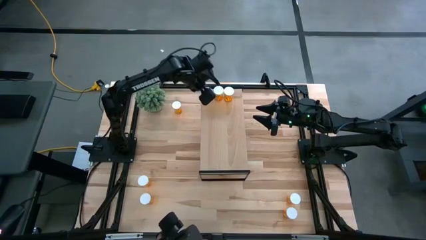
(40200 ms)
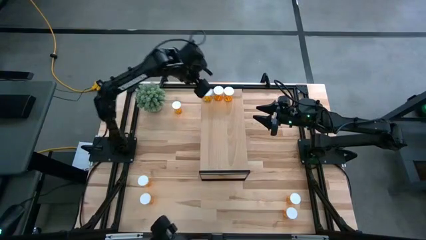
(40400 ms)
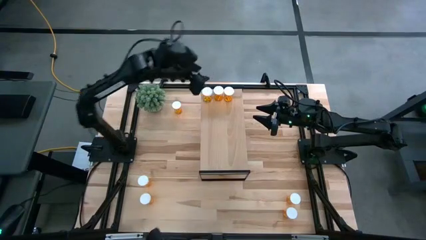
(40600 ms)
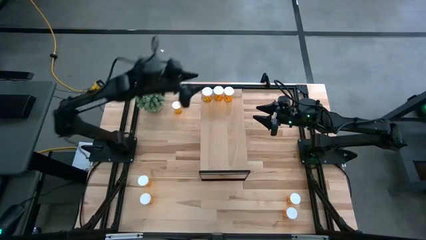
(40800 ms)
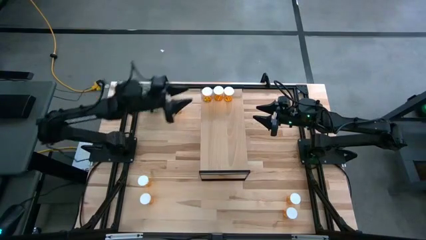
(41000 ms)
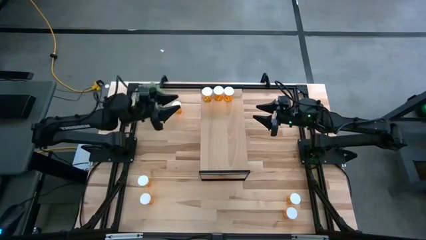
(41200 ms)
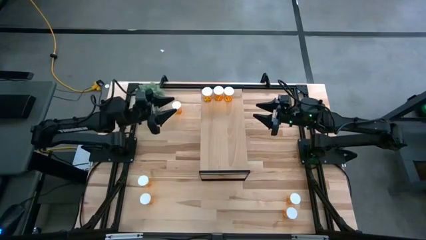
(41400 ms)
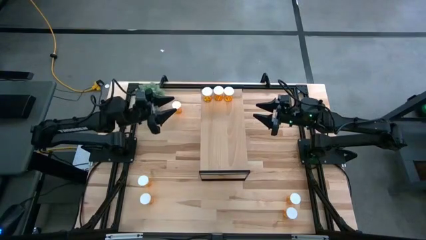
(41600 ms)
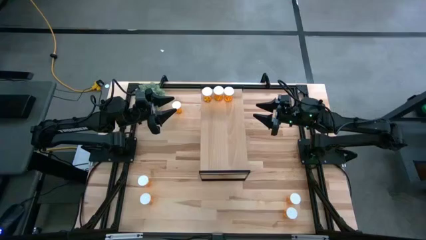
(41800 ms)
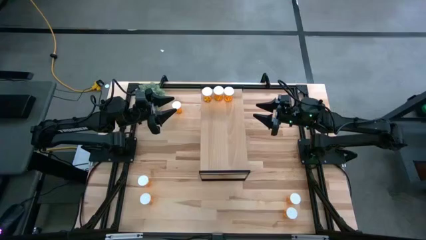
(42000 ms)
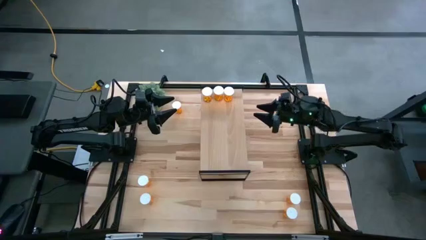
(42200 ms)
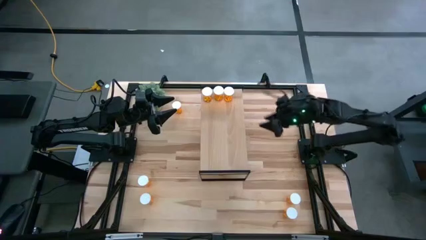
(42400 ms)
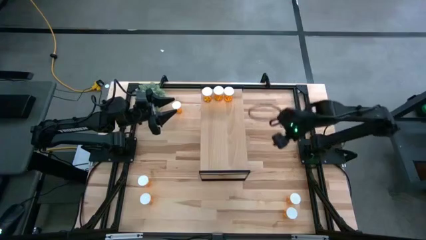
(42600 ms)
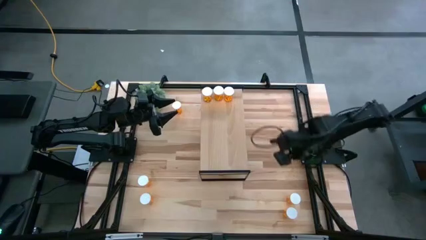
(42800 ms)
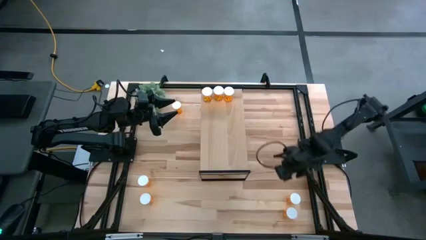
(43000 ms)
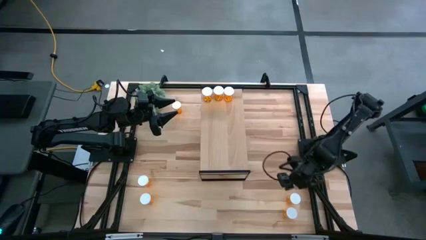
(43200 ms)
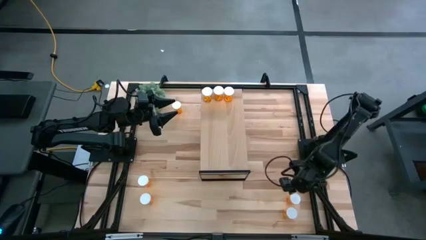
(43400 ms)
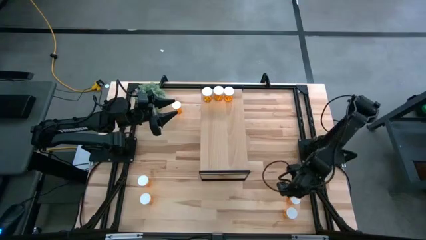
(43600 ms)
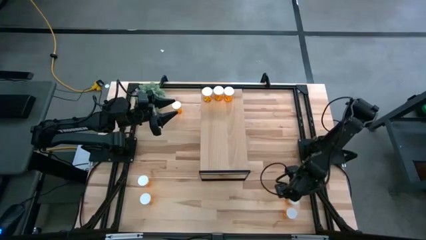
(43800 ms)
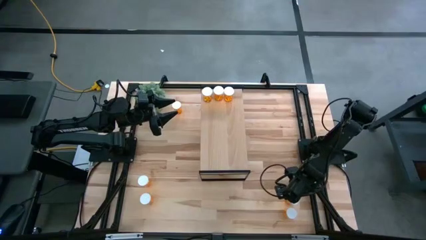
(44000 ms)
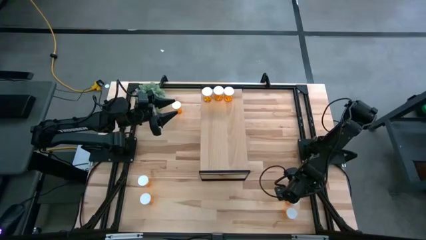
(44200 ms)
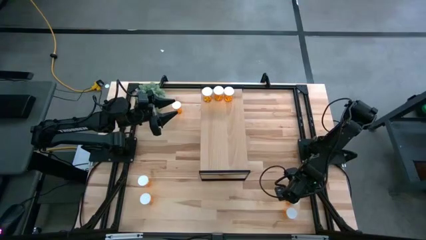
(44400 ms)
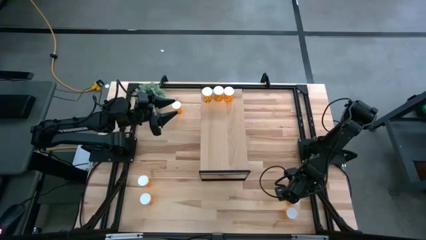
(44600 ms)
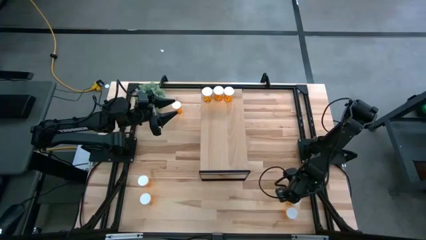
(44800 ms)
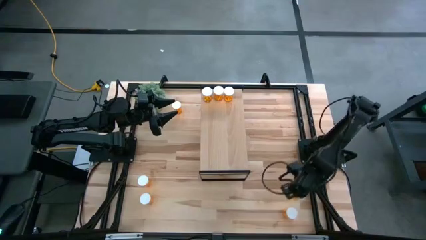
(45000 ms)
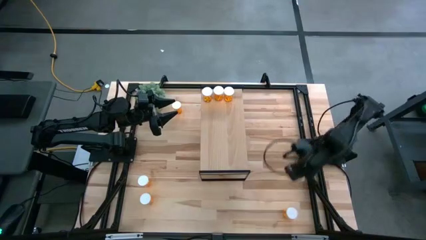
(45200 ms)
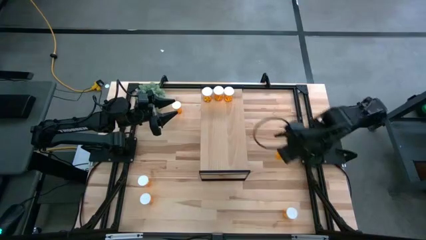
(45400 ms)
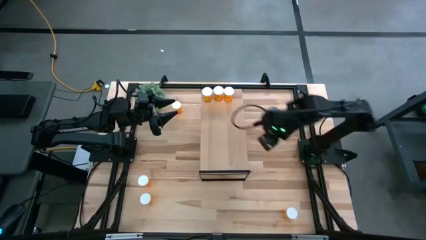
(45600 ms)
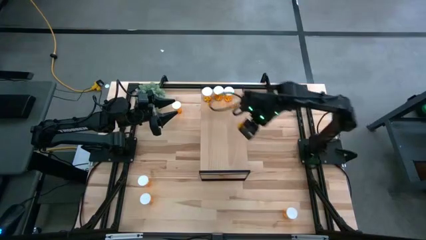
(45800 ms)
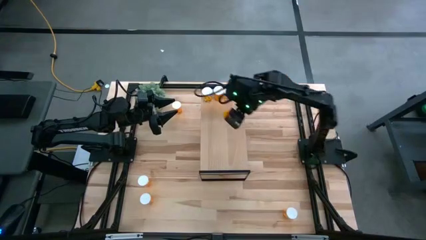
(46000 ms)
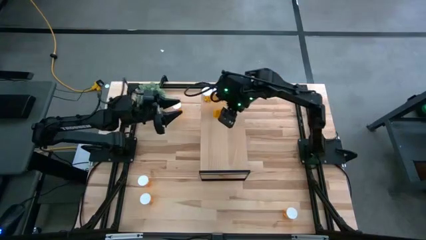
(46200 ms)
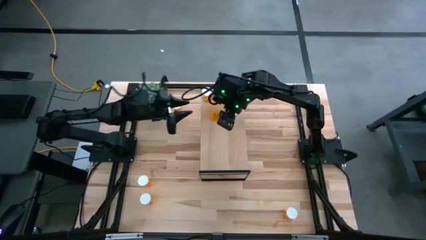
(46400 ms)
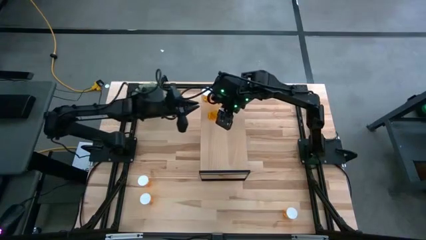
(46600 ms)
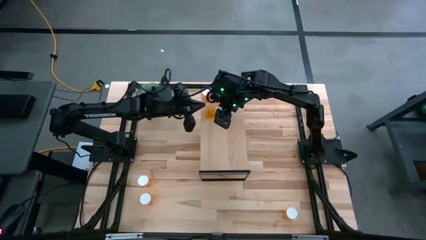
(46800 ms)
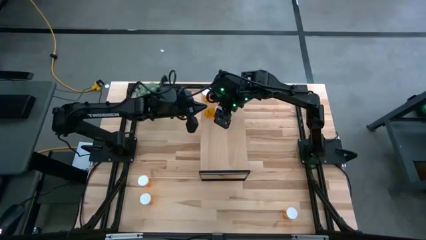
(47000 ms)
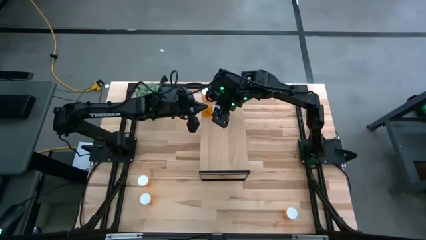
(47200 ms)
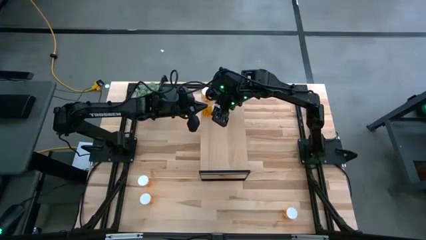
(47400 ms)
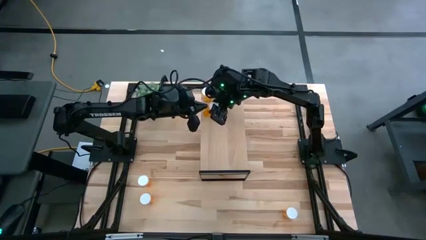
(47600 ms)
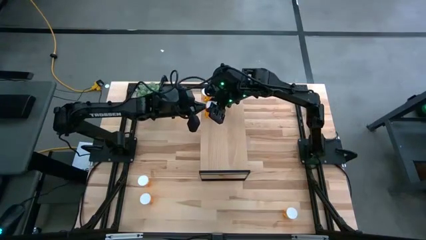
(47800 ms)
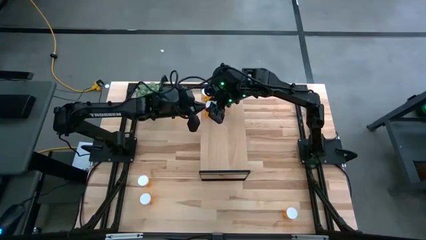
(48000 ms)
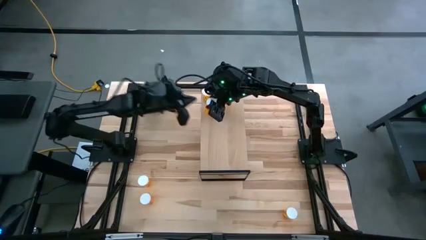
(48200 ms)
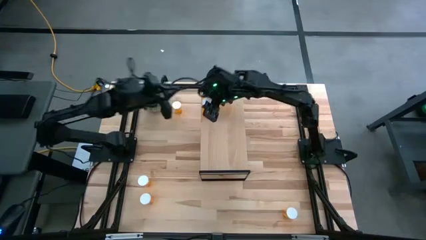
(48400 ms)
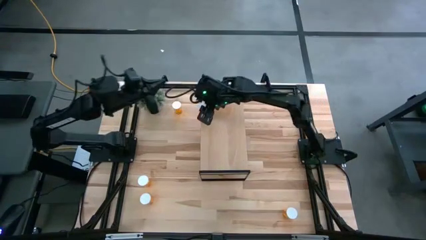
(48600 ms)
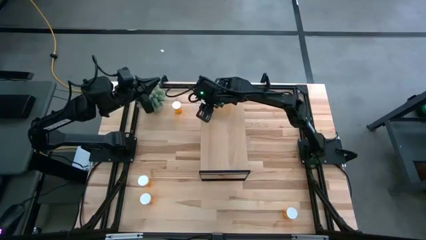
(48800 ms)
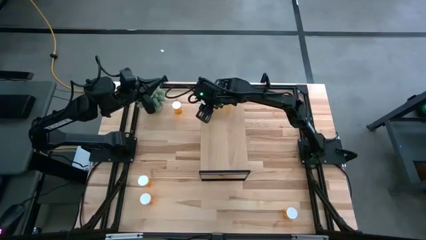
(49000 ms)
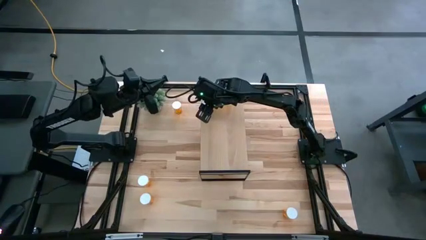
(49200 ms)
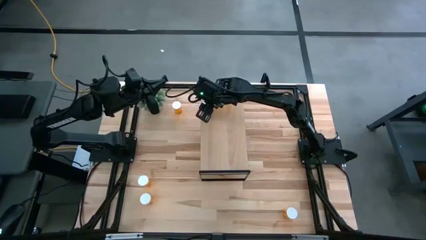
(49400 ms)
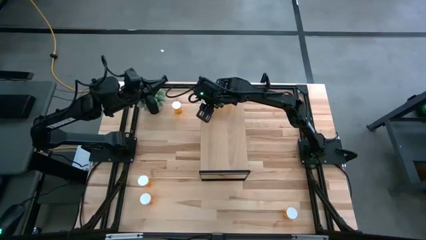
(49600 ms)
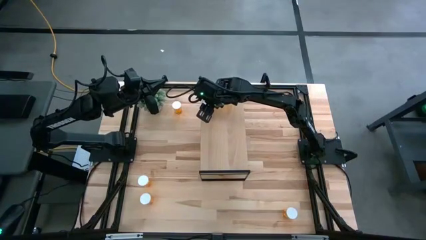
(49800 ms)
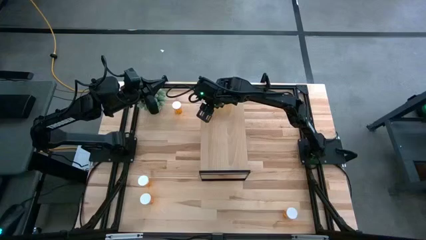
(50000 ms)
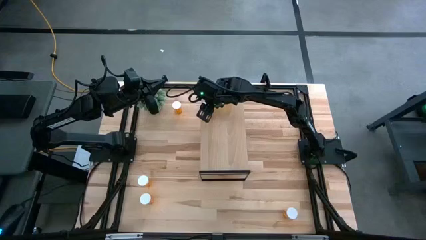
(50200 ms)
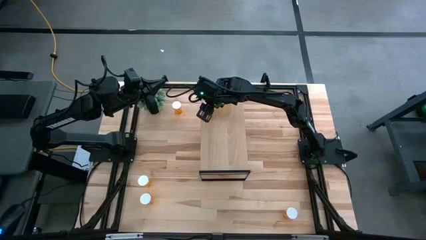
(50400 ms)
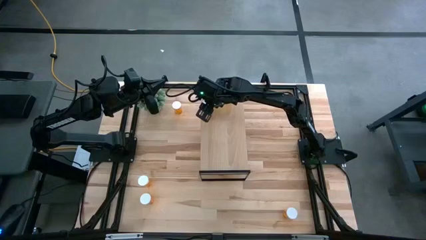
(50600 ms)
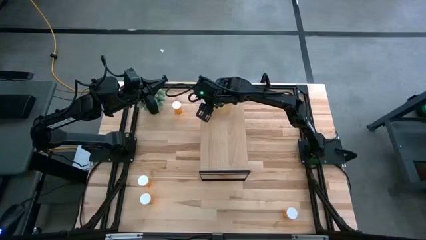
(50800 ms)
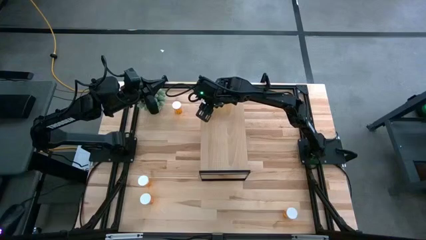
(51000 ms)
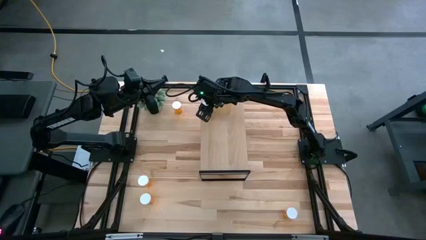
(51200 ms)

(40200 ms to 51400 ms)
Task: Pick and place medicine bottles onto shelf by color
Put the orange pill bottle on the shelf

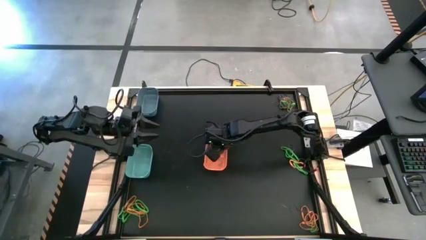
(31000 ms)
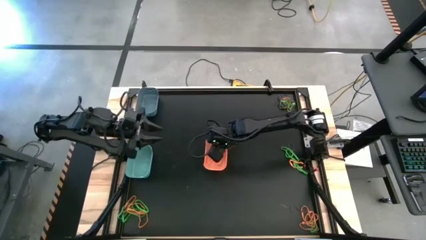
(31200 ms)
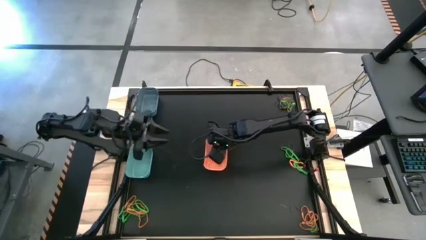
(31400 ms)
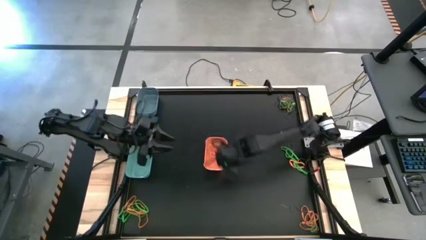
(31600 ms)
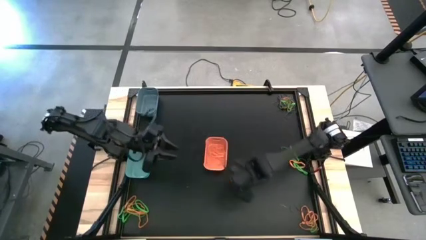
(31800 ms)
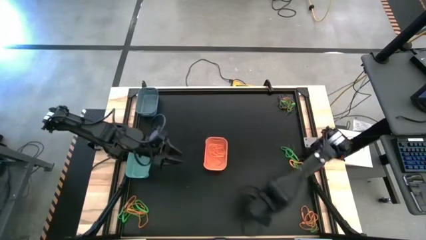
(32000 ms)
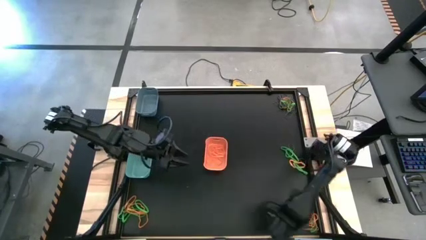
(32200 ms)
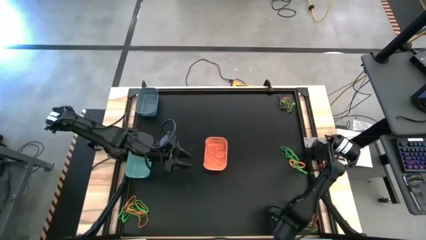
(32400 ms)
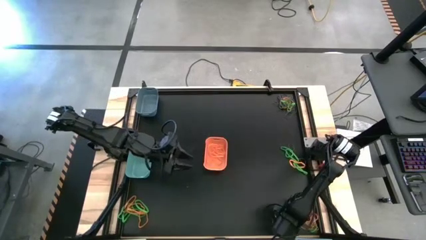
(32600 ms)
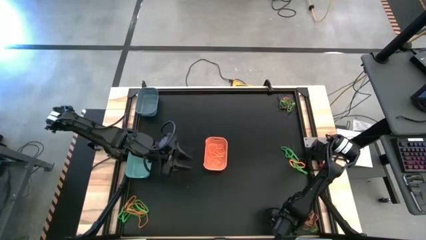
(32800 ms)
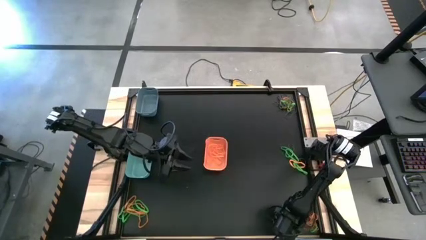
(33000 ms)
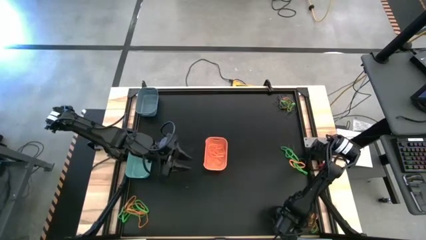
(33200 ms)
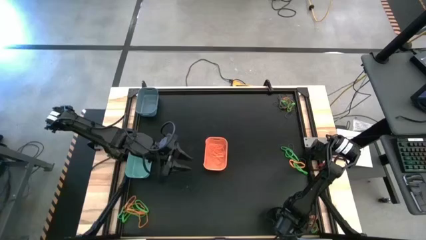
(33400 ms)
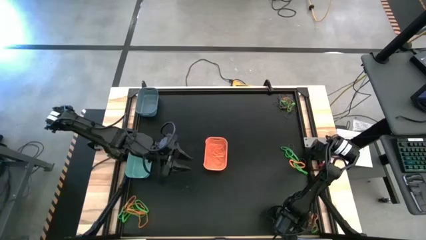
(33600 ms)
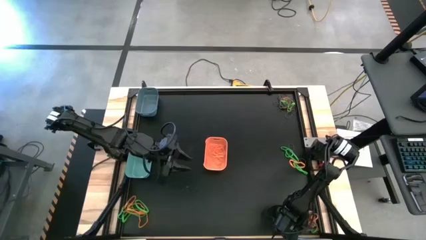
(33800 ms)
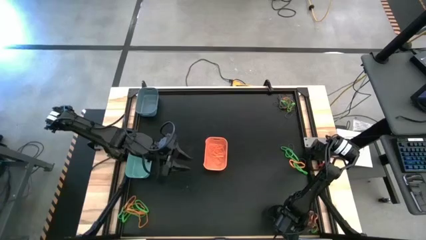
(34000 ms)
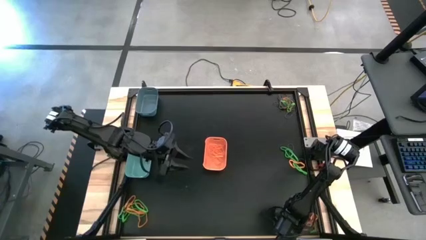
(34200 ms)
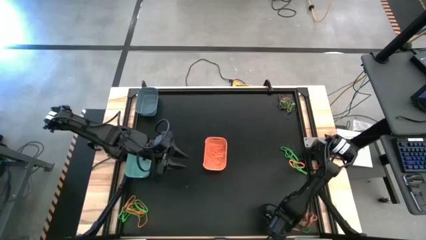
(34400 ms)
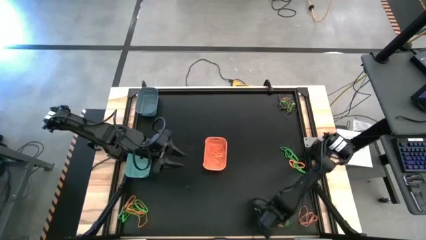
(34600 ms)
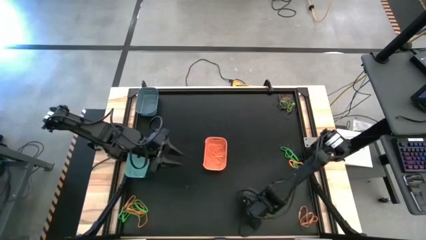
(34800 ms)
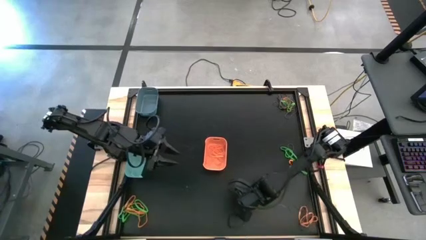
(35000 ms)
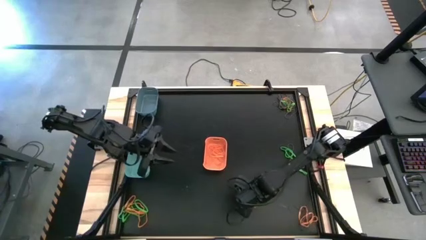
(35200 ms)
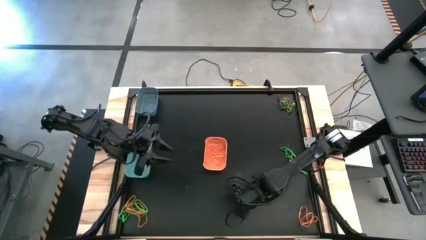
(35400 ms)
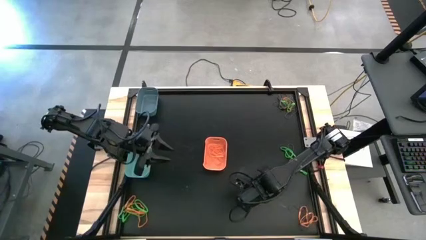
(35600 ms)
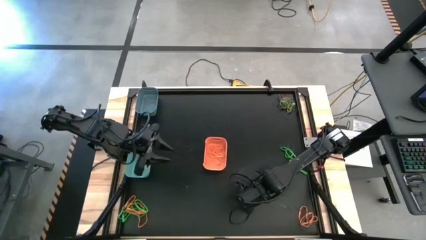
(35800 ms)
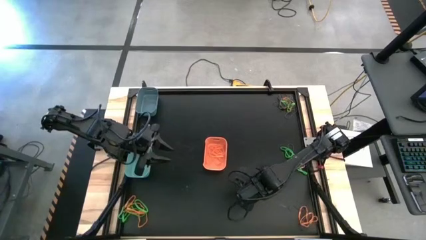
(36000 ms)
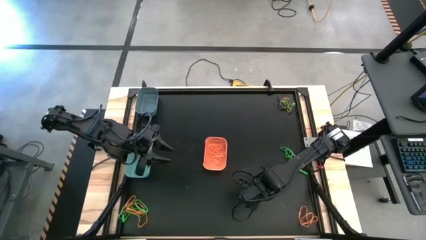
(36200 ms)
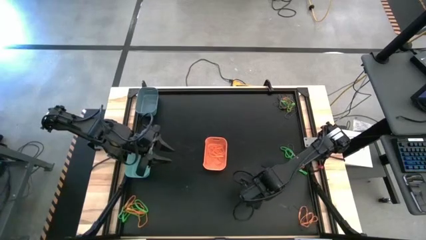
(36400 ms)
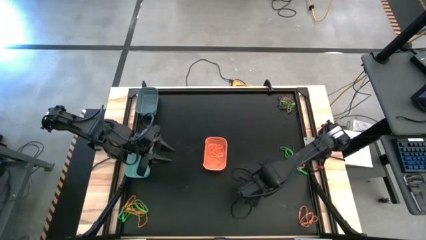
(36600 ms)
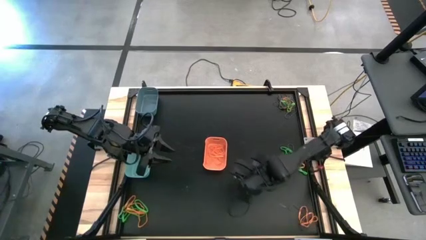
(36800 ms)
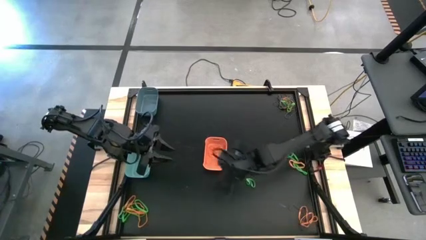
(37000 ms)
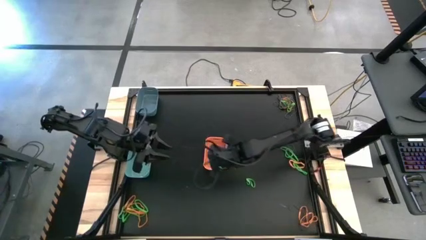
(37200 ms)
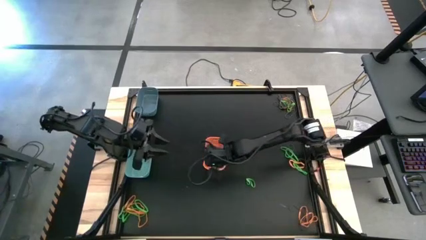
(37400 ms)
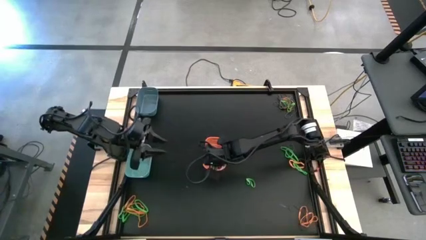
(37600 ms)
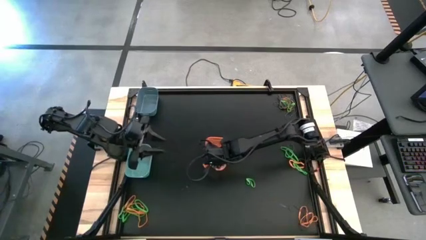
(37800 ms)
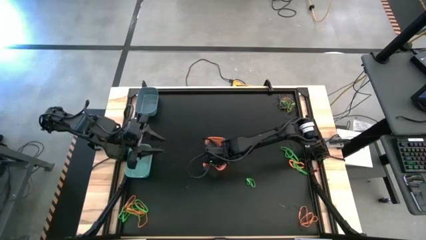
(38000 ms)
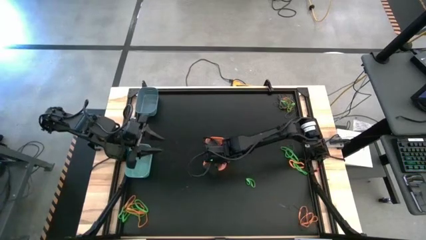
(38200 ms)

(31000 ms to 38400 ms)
Task: Sort rubber bands into baskets
Put the orange rubber band into the orange bin
